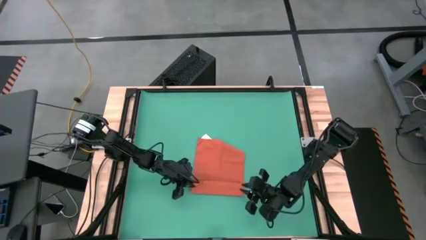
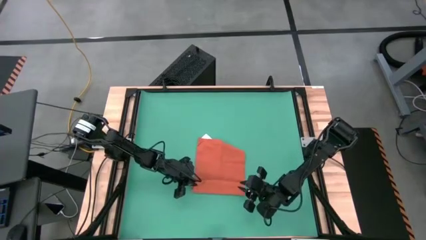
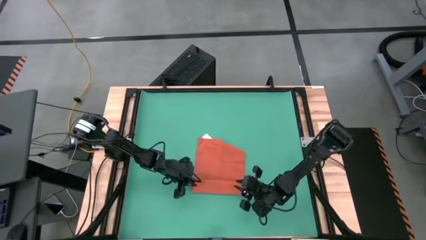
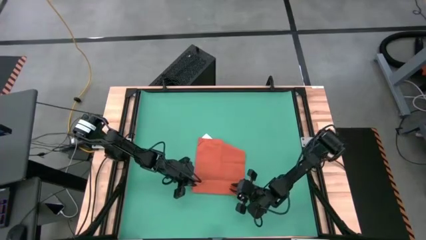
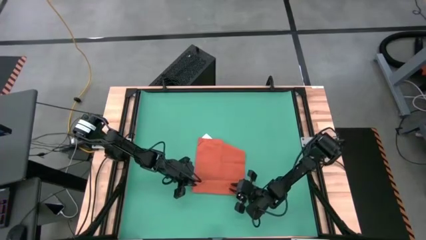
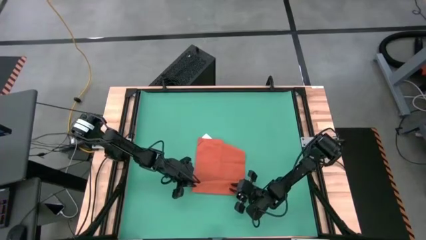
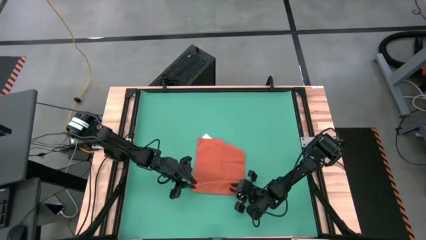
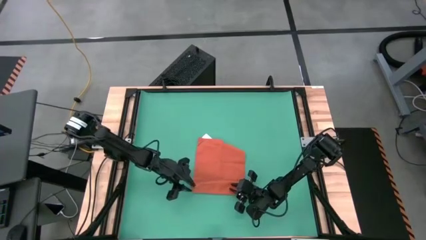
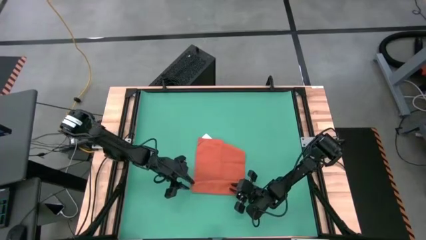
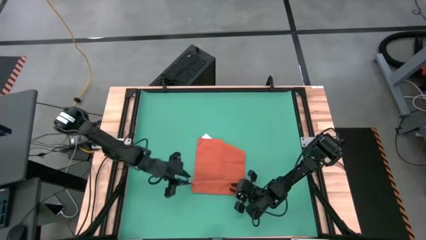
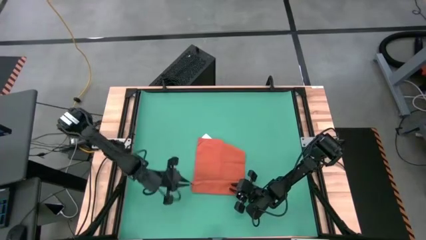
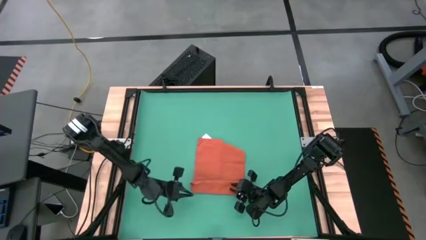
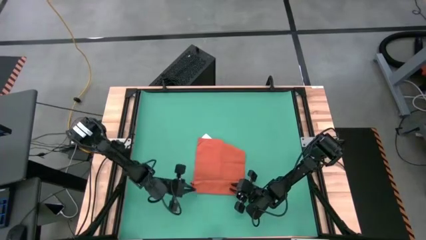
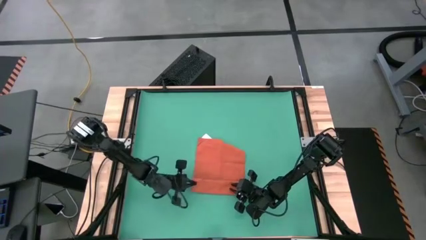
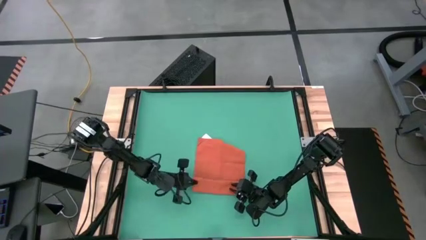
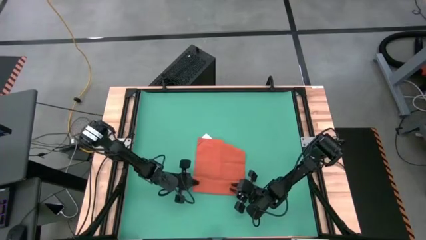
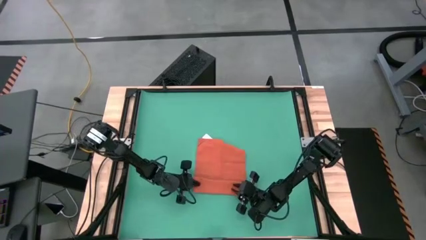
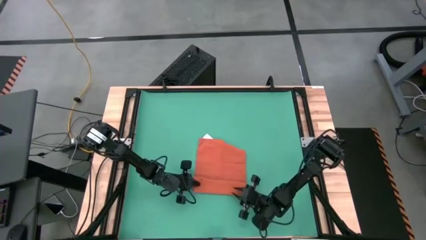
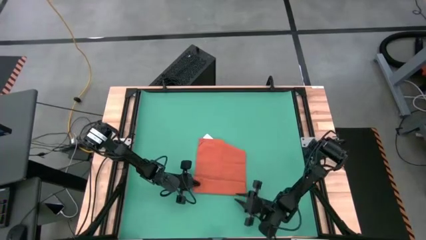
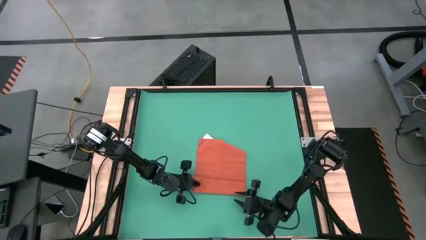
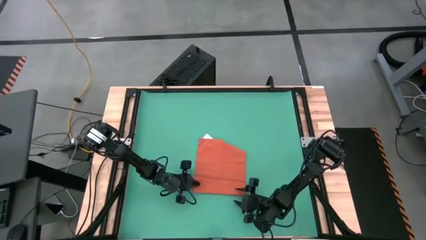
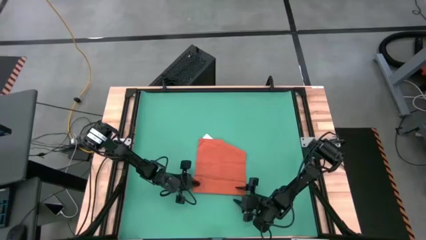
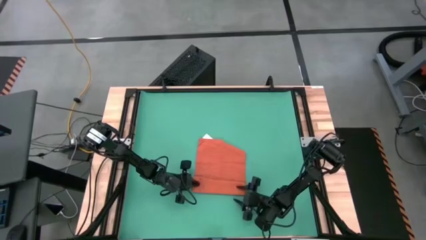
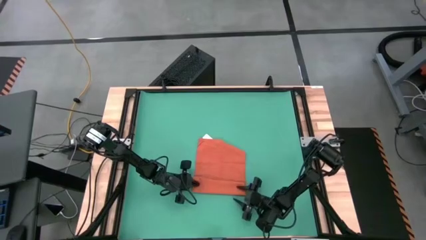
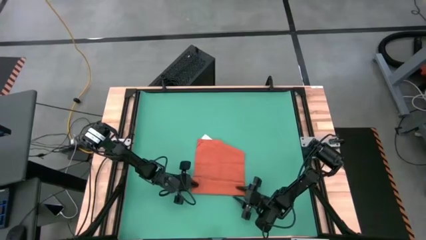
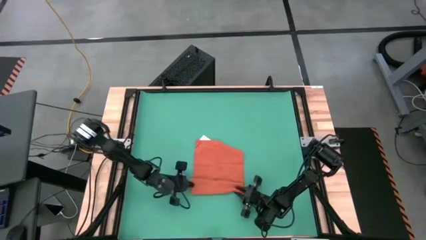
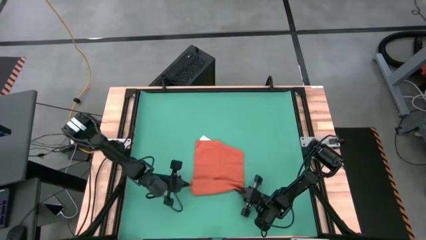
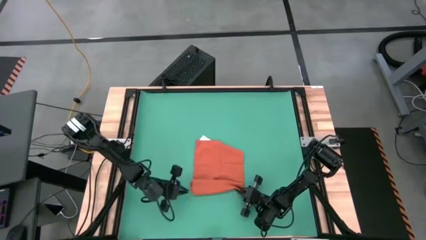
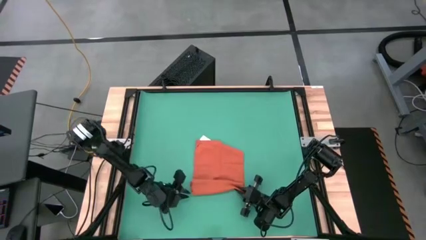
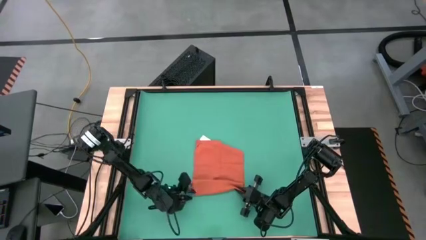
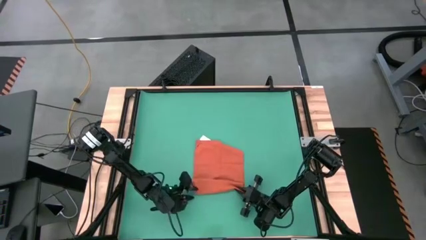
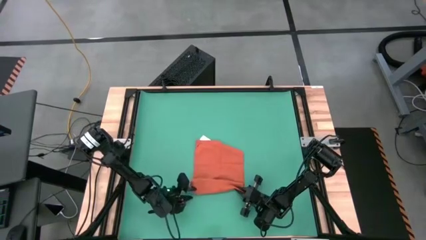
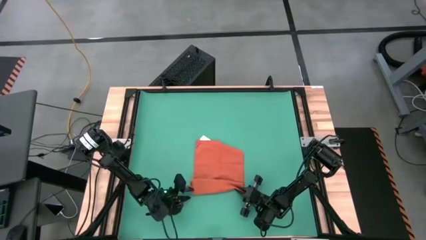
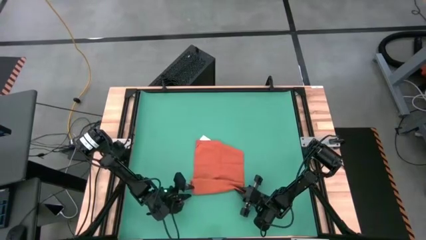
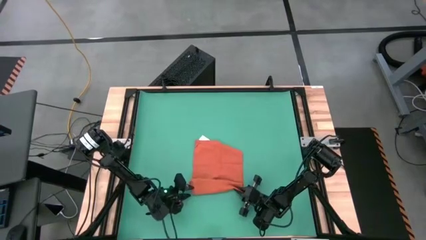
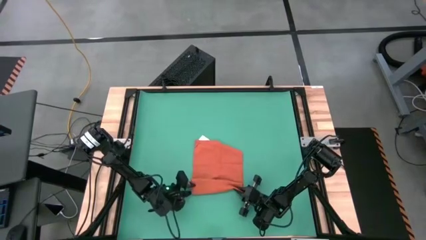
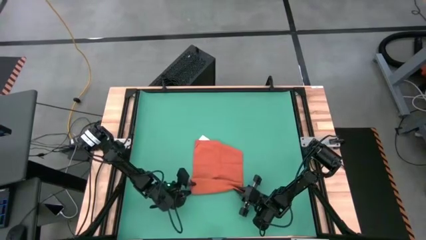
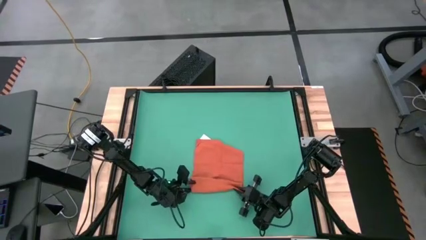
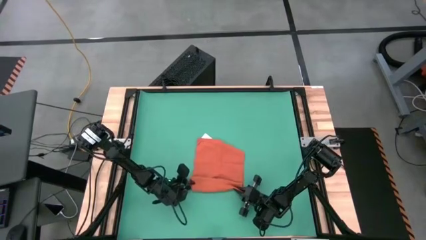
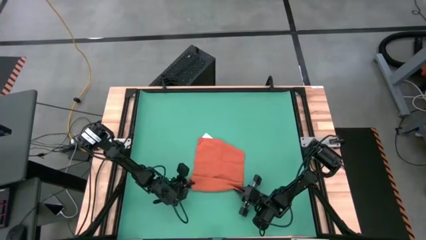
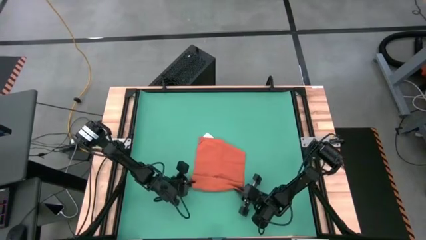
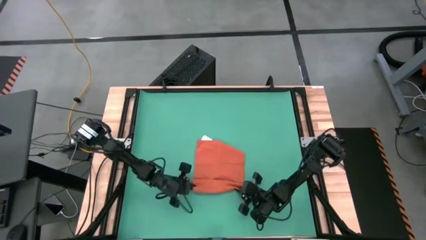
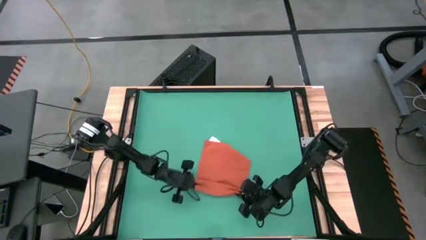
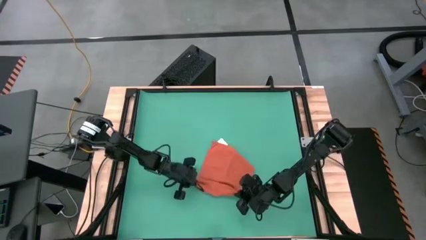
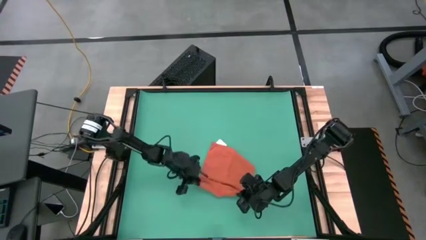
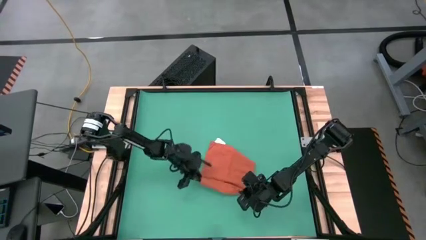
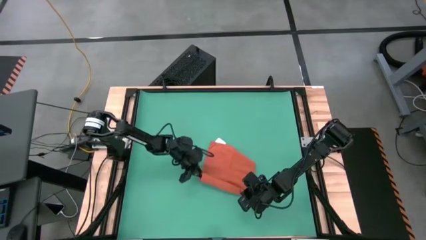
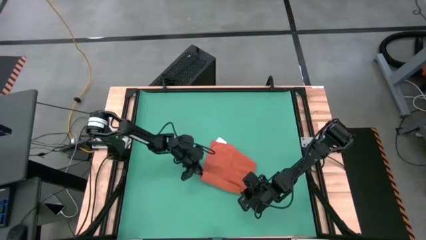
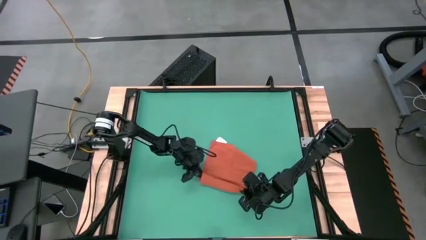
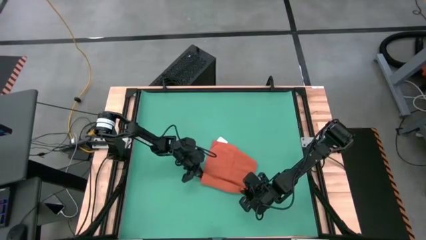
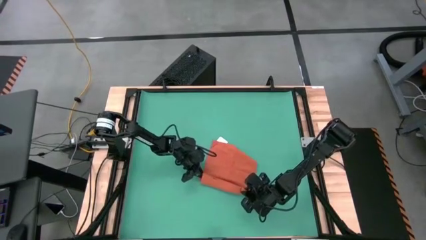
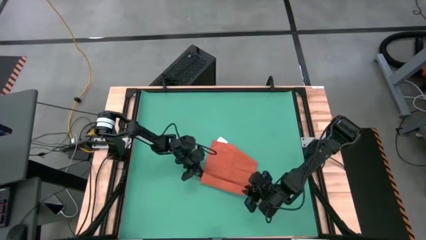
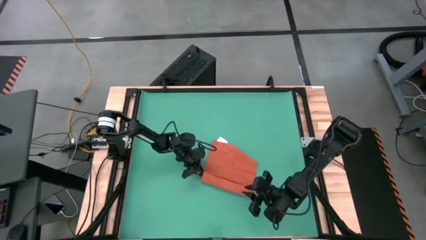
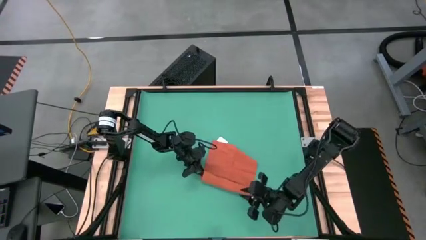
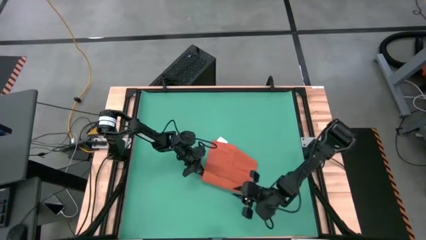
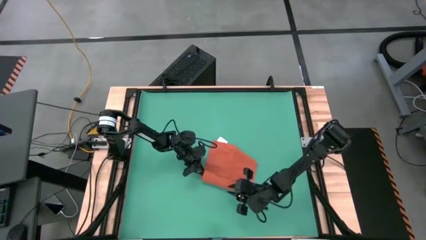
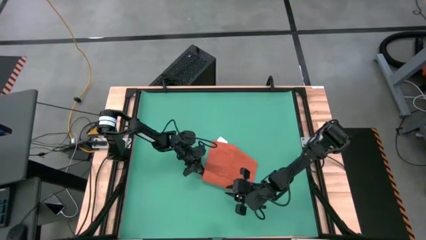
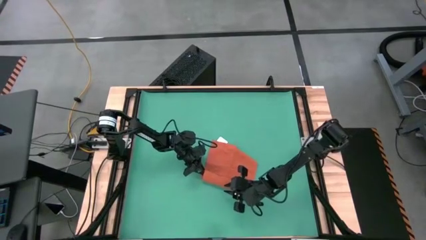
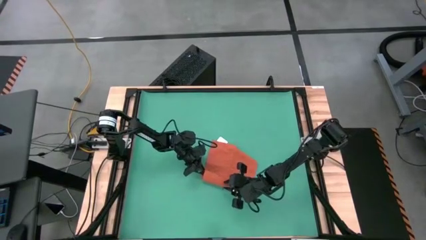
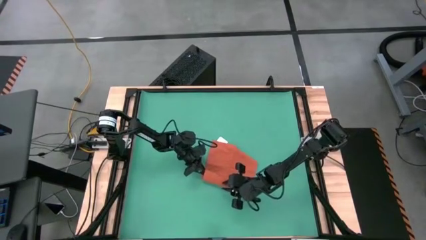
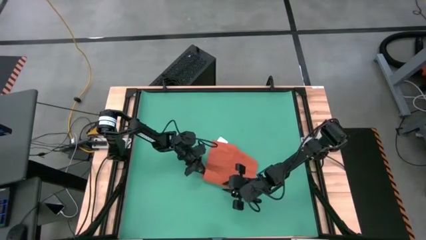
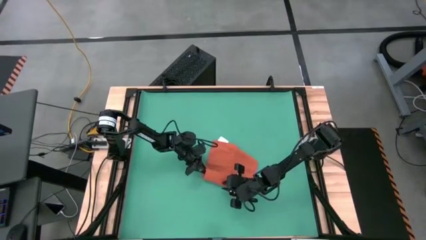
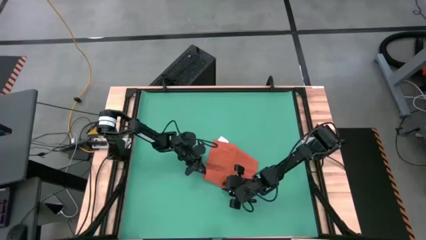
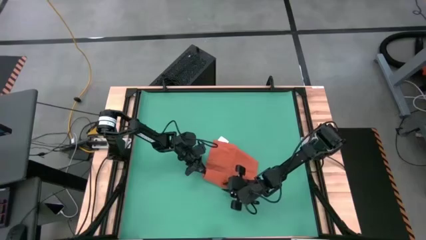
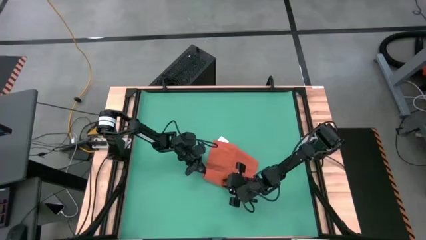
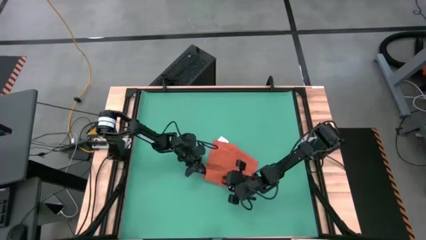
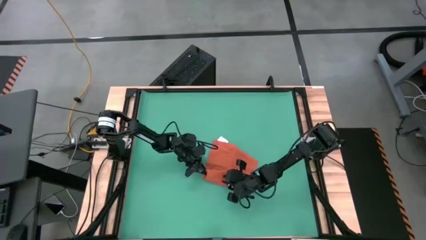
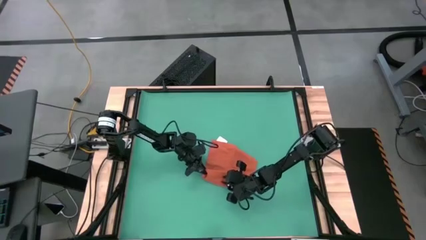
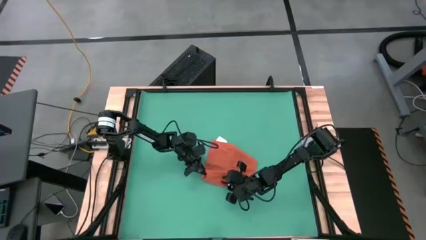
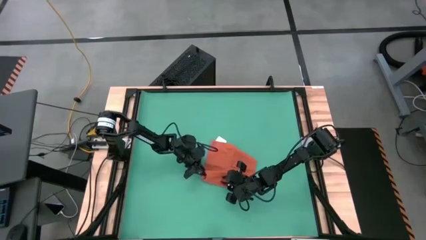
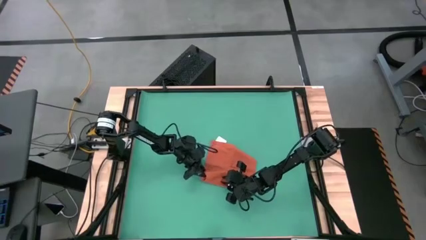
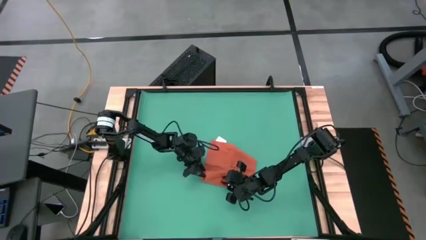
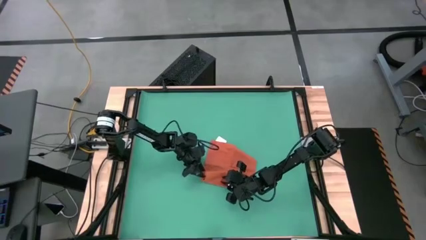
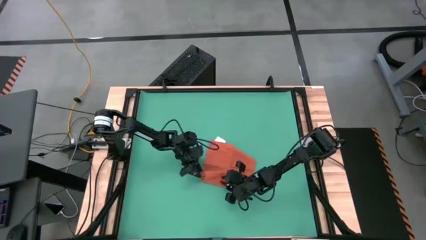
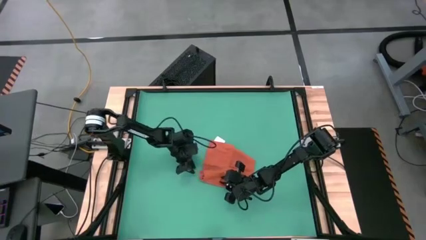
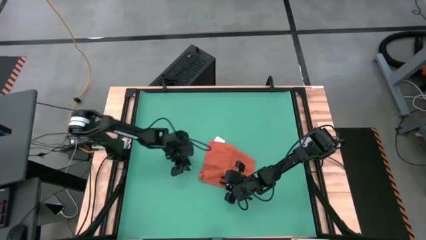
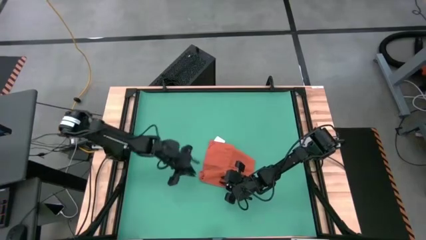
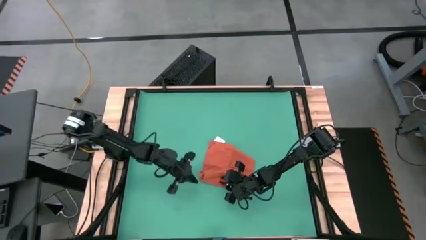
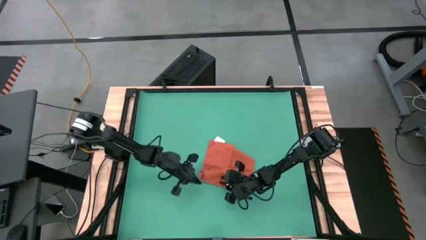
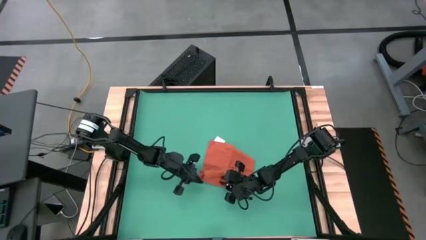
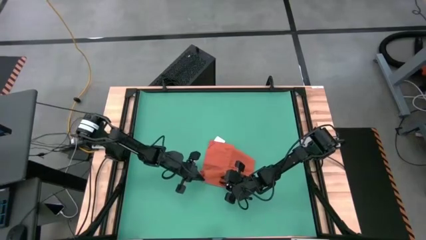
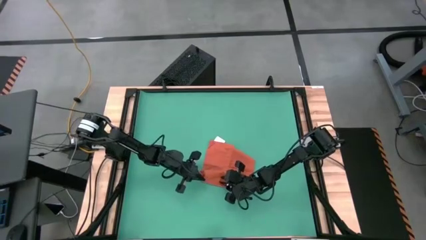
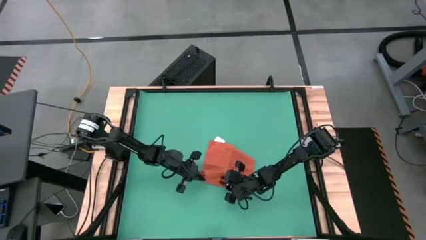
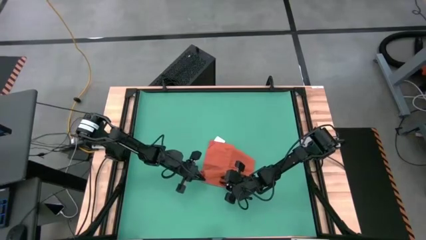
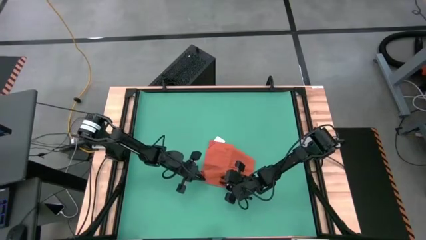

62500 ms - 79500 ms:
Task: Roll towel into tight, uniform cylinder
Roll the orange towel
